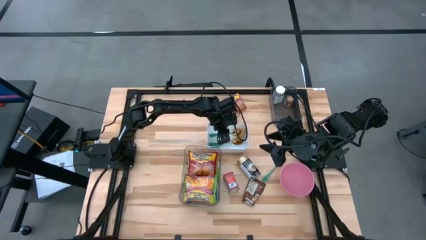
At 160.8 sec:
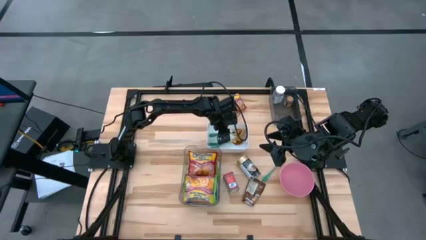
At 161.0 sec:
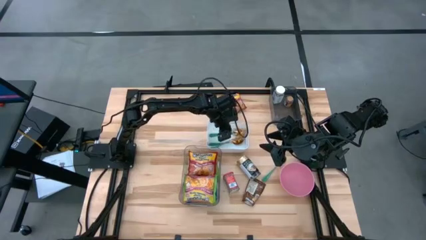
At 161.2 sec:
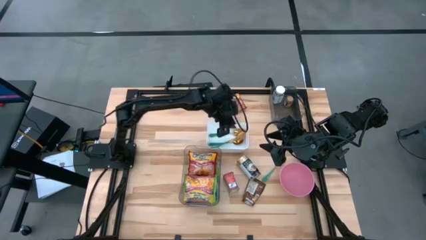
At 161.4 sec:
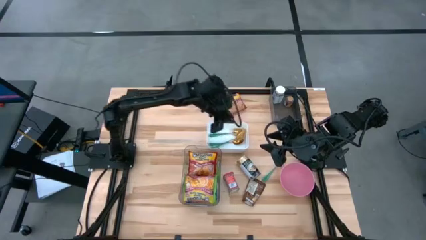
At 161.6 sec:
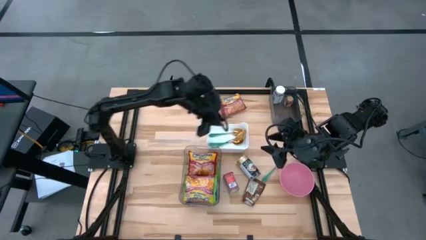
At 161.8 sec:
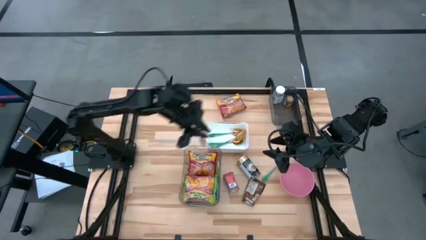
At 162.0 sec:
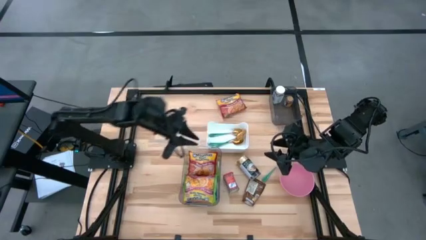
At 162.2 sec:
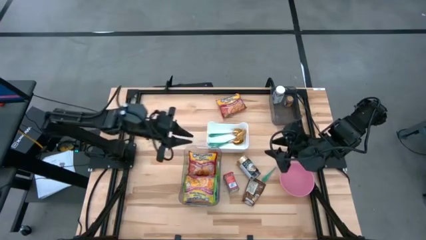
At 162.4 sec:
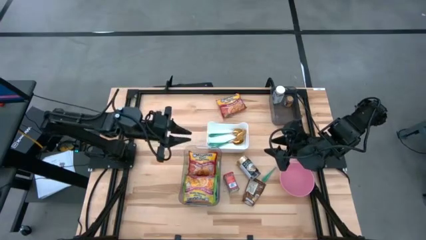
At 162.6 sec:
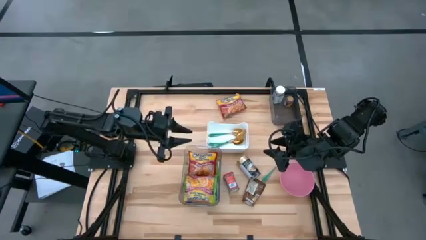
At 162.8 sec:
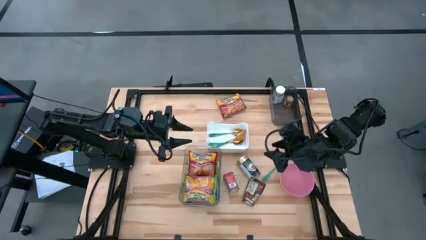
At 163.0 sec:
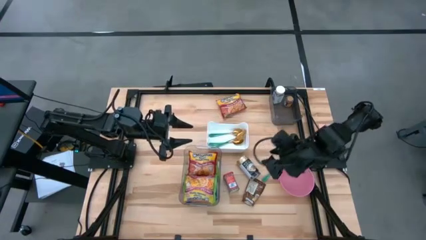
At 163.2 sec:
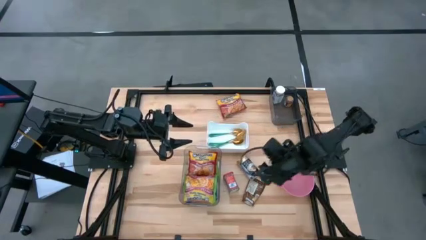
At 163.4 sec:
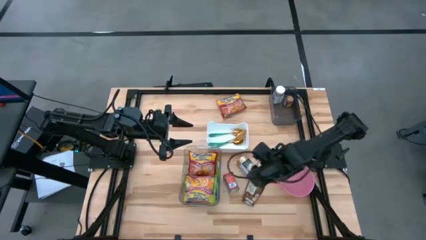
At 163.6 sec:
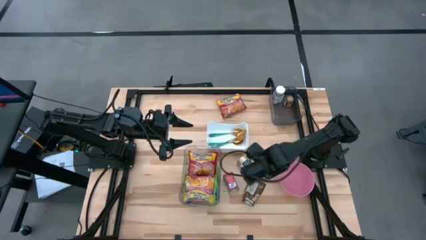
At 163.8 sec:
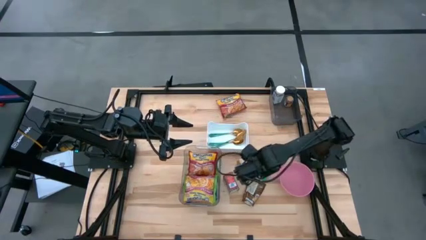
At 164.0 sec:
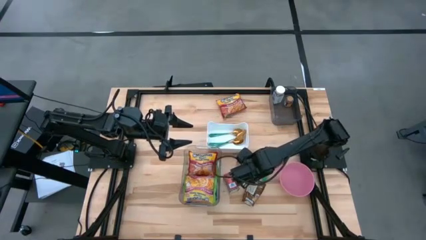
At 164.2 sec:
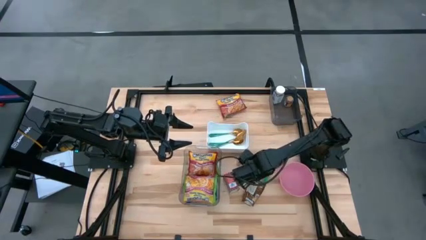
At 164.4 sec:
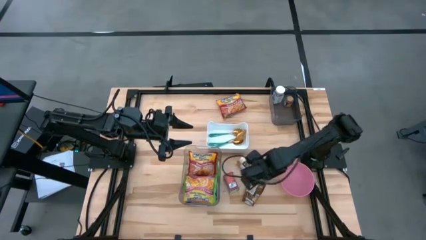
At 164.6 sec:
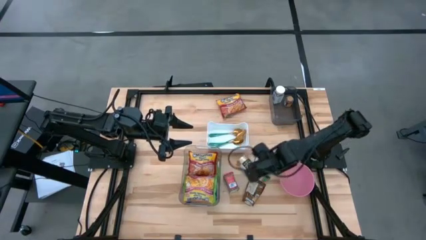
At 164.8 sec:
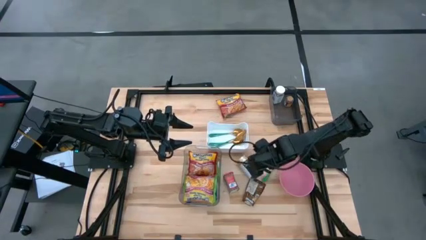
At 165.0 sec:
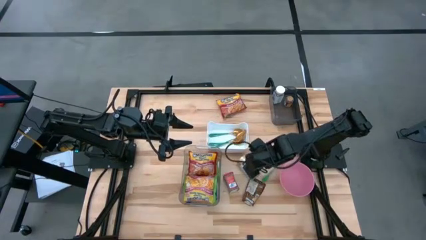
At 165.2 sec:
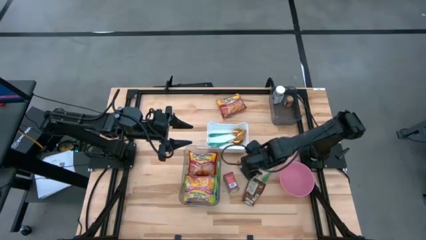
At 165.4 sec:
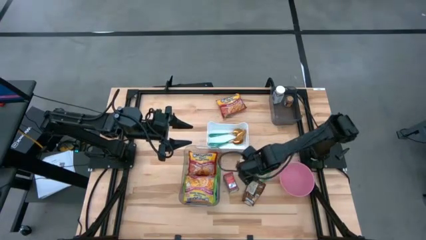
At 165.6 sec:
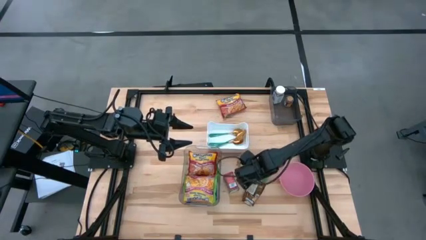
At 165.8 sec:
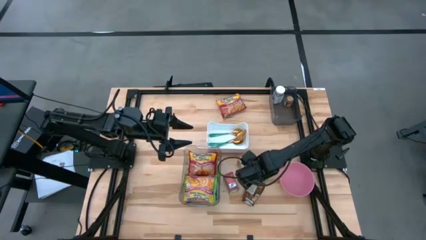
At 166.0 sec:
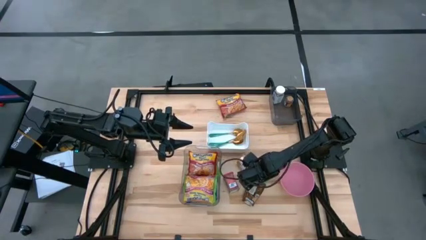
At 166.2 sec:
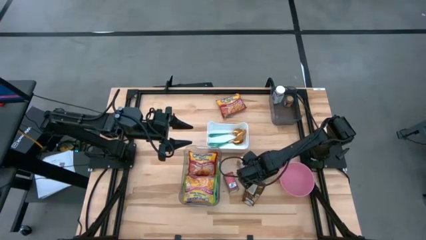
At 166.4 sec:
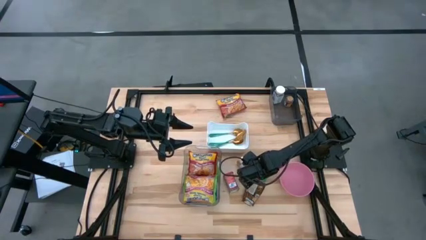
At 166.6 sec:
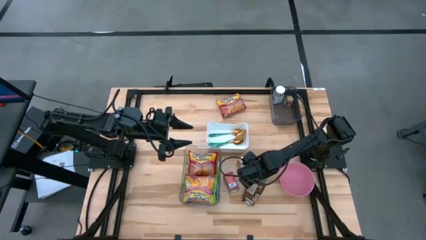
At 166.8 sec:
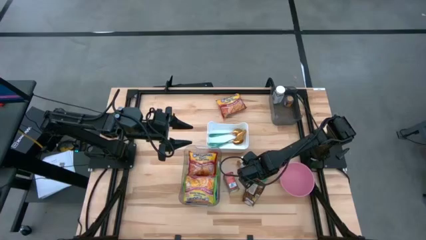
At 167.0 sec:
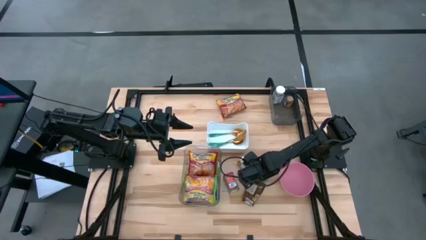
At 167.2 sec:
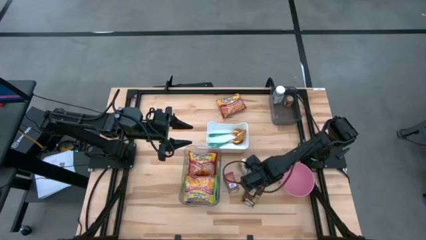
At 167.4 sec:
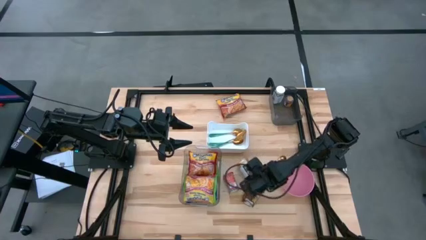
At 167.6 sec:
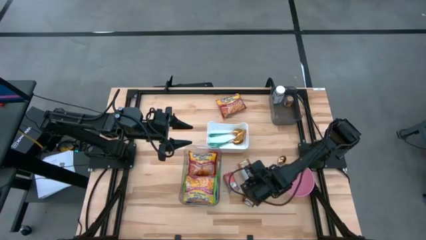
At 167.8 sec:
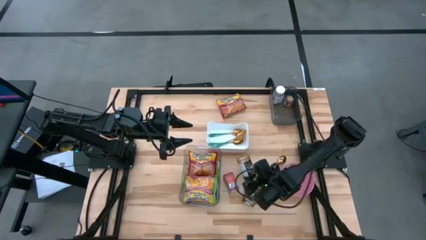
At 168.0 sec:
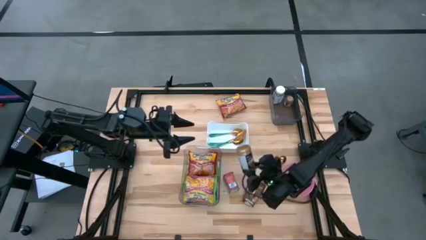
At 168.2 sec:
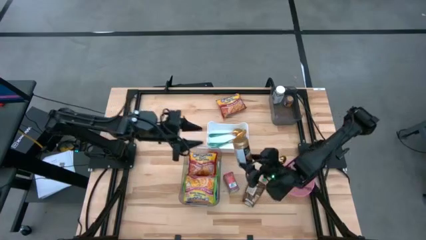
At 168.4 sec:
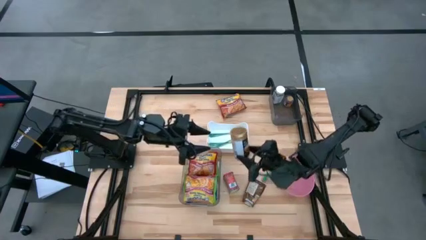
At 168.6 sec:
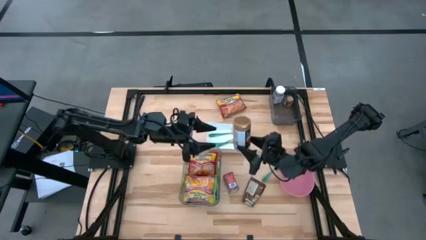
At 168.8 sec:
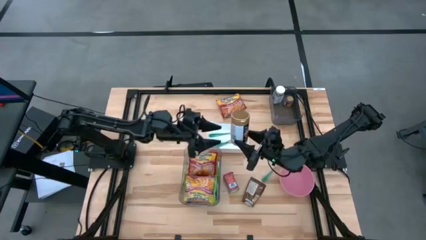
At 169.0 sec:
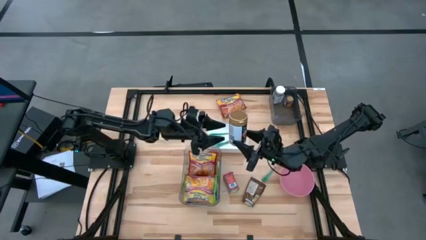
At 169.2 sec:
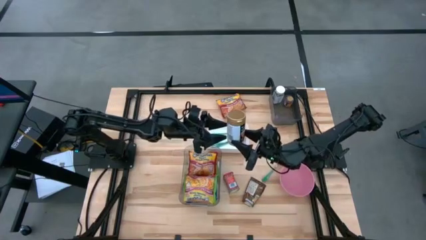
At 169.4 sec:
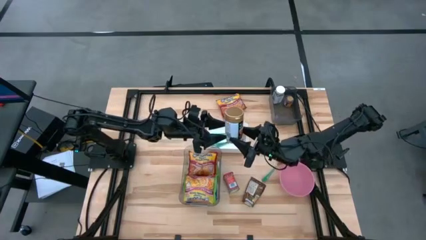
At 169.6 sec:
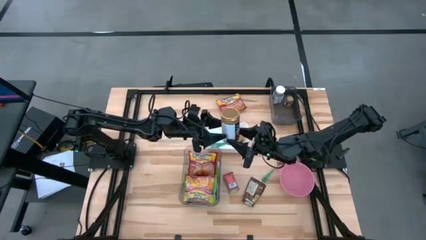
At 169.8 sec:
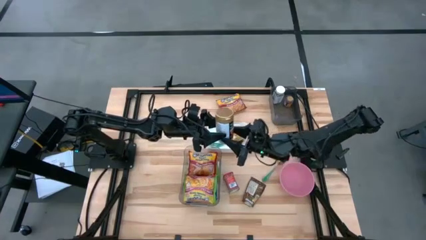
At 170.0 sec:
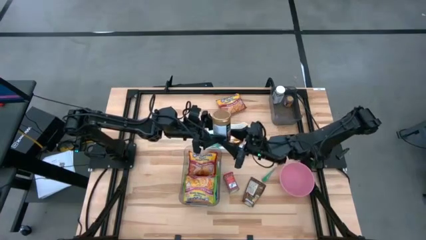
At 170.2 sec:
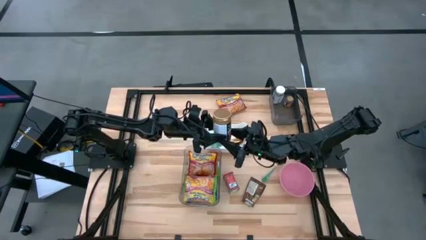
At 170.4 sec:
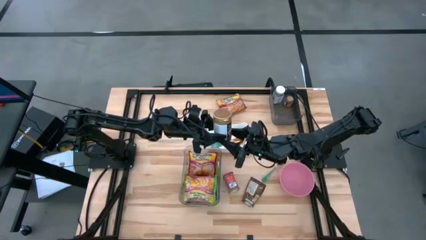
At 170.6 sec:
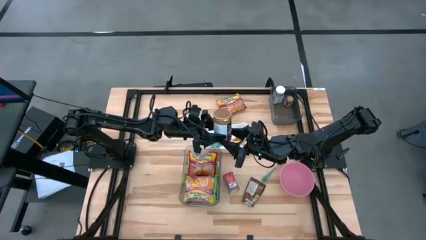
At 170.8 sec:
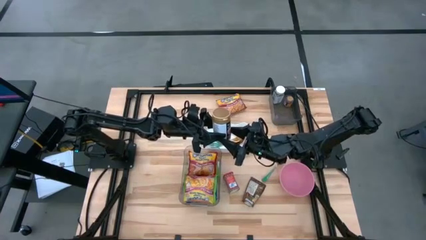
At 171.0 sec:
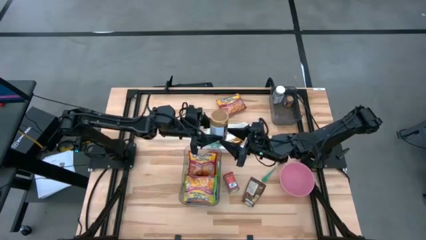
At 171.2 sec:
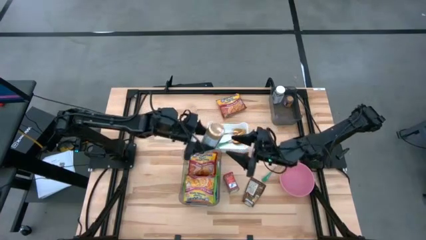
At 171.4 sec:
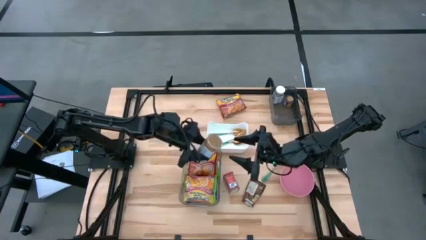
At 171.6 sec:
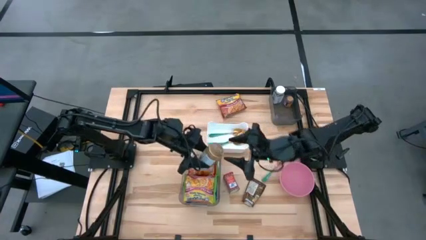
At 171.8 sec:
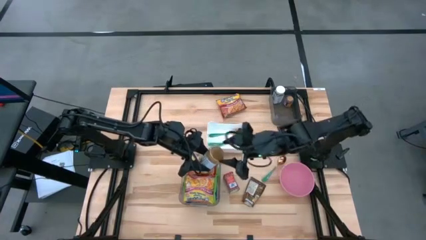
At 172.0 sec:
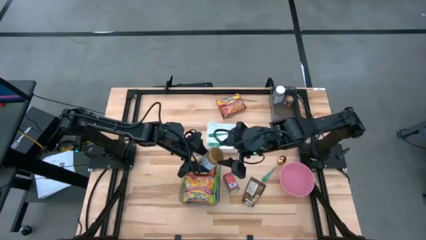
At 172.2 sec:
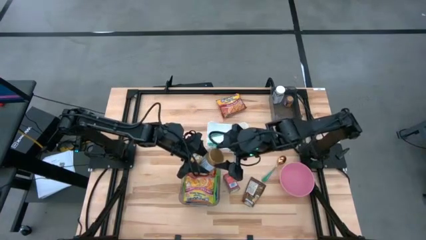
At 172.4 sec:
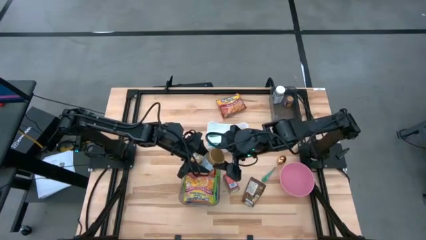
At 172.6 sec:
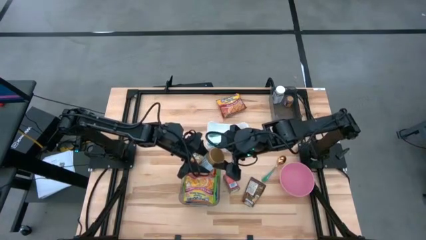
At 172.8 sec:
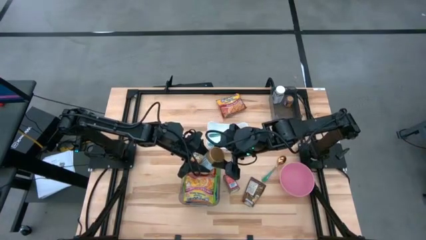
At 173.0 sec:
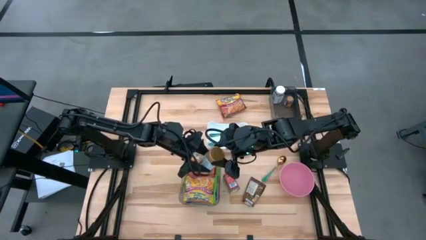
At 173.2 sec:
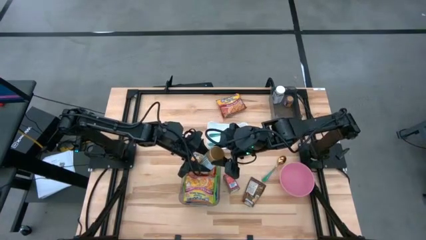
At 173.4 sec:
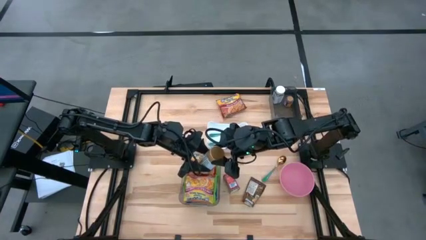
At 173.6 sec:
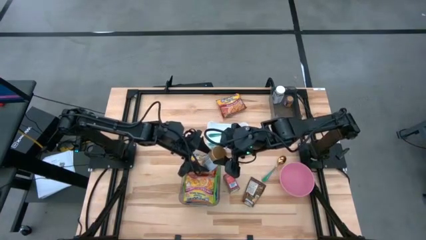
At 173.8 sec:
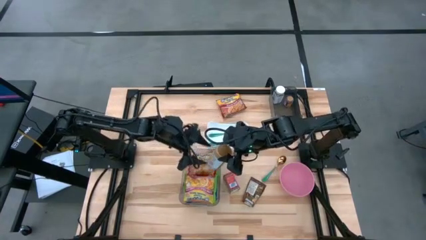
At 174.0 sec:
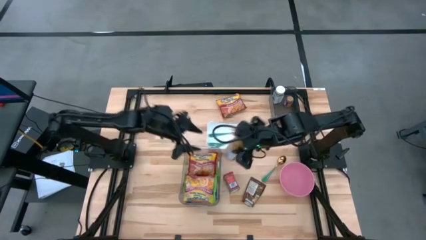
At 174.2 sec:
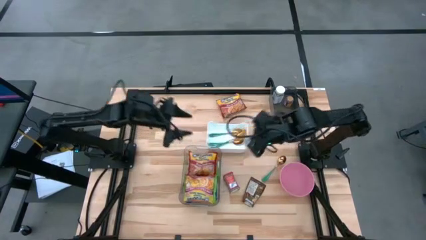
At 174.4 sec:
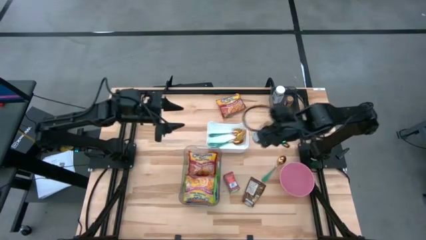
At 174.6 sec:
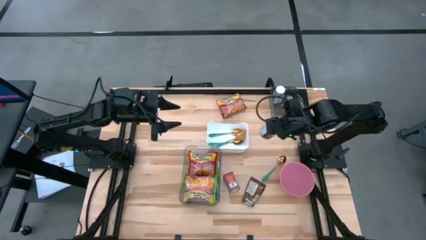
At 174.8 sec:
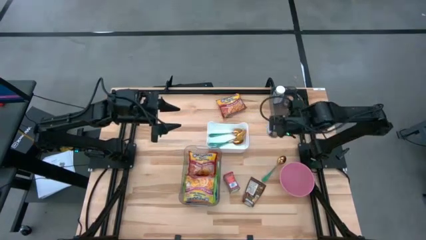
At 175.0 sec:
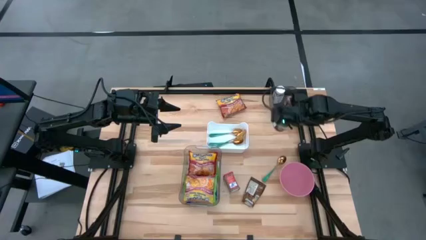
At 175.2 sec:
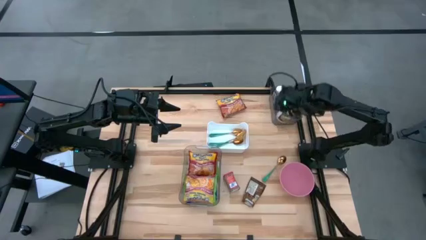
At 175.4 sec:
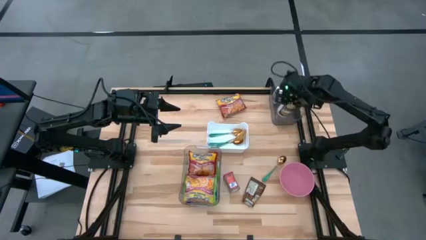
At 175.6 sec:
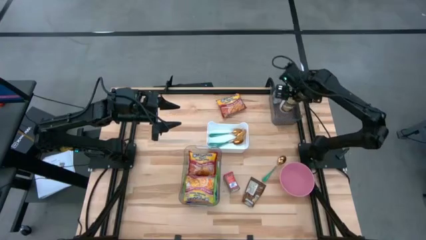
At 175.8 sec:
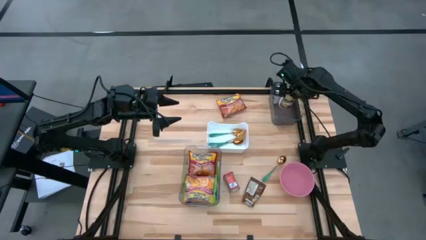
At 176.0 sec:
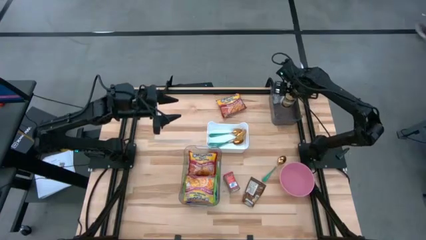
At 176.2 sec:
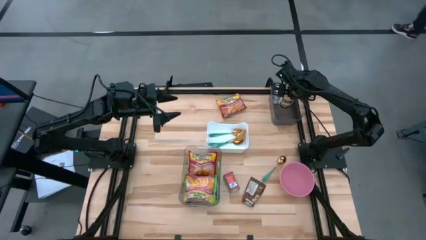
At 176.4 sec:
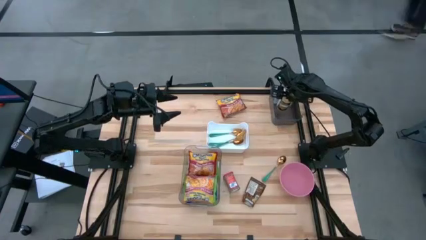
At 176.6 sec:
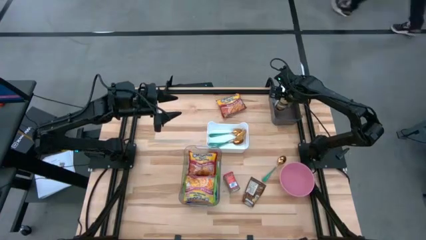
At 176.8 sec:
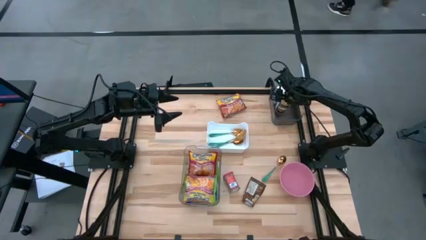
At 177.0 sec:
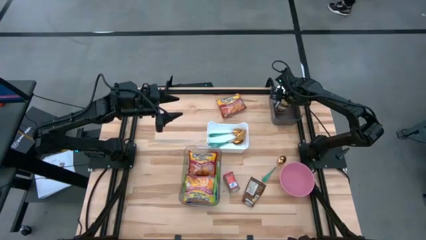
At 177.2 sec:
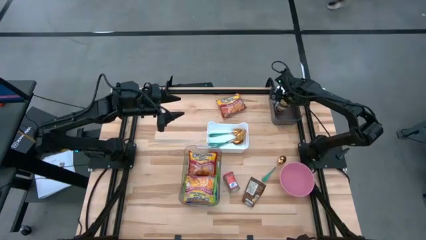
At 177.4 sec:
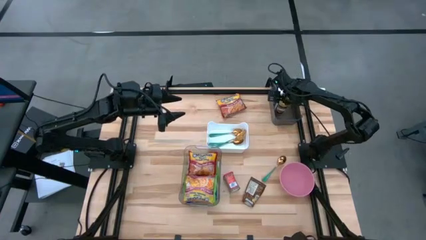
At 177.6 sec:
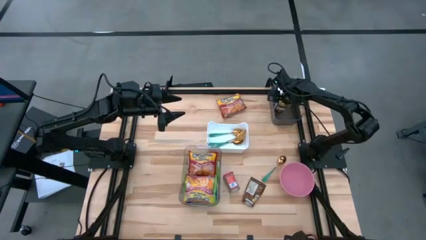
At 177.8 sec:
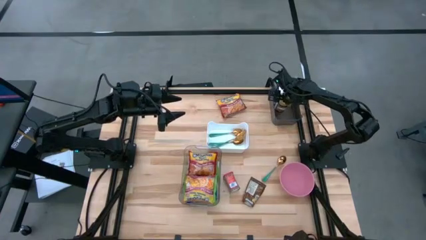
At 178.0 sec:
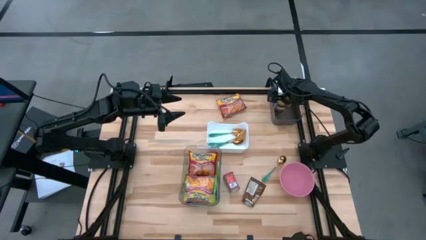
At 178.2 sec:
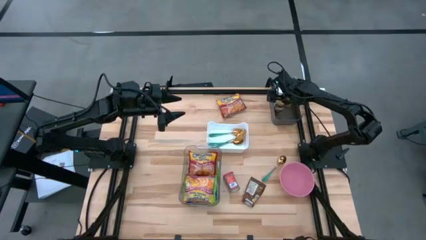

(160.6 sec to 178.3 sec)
Task: Pick & Place Food Item
Put the gold spice bottle into the black bin
